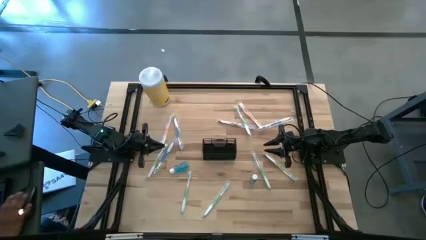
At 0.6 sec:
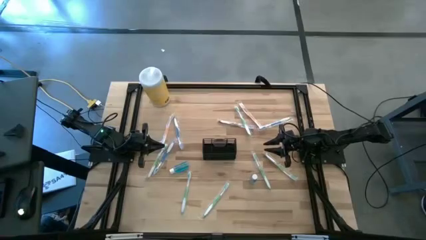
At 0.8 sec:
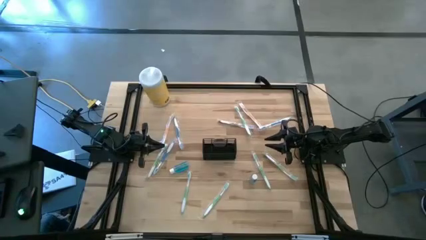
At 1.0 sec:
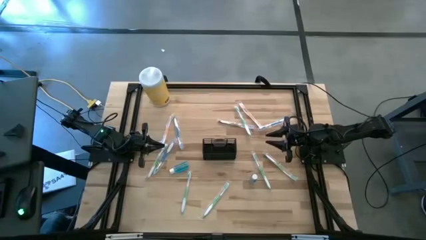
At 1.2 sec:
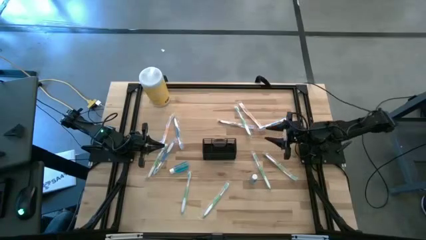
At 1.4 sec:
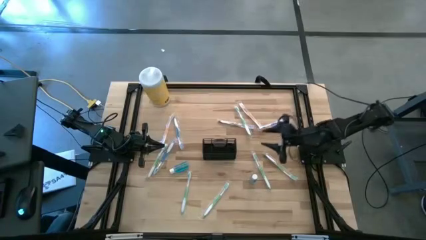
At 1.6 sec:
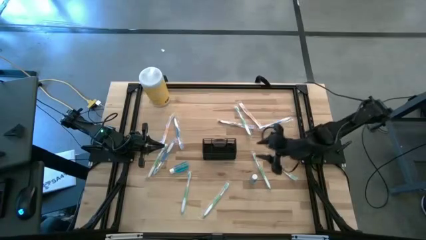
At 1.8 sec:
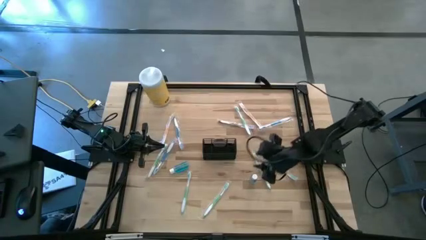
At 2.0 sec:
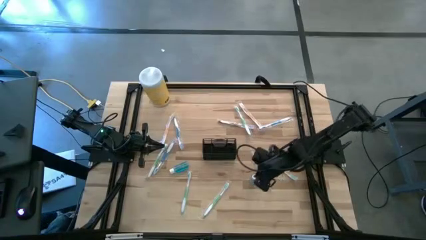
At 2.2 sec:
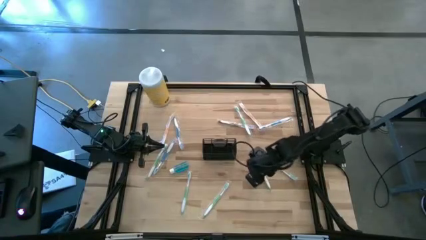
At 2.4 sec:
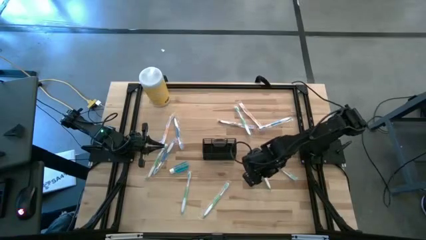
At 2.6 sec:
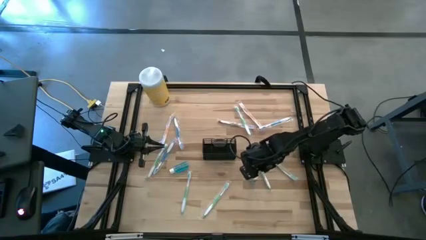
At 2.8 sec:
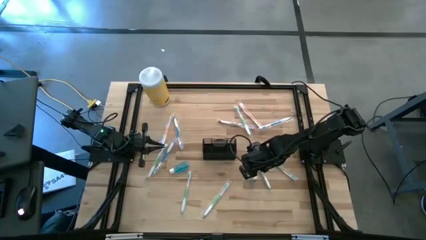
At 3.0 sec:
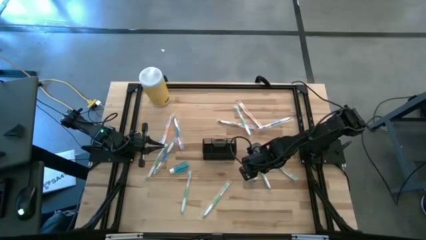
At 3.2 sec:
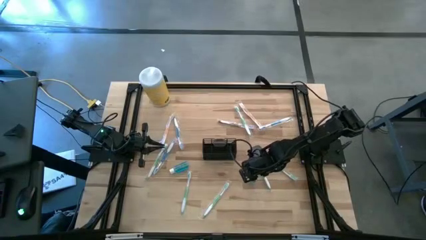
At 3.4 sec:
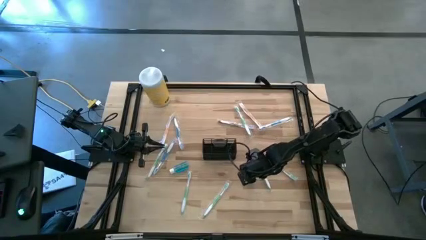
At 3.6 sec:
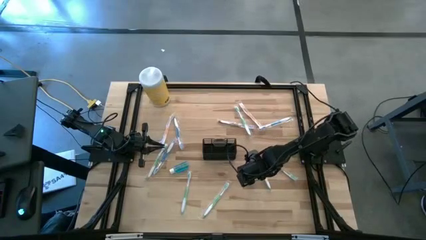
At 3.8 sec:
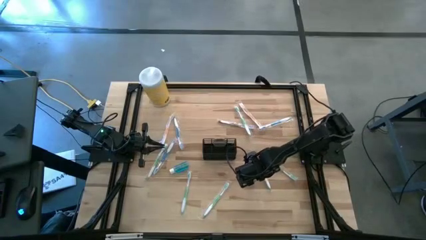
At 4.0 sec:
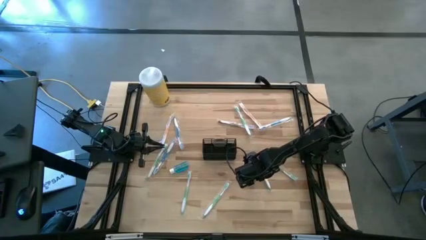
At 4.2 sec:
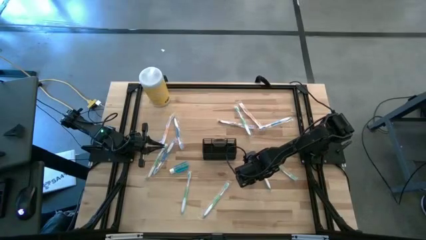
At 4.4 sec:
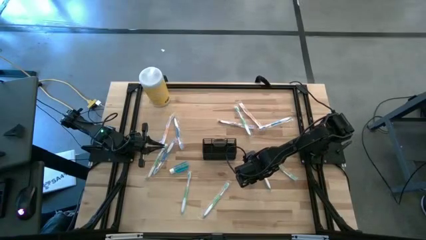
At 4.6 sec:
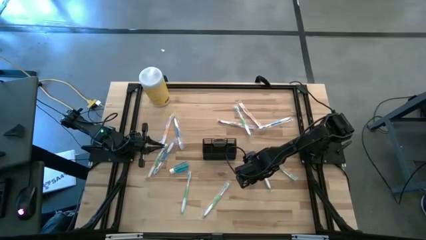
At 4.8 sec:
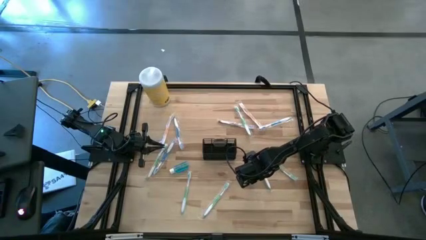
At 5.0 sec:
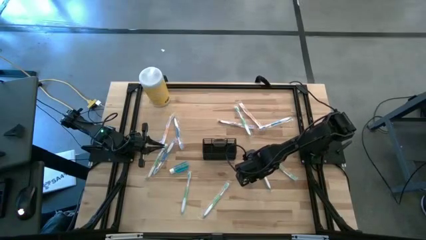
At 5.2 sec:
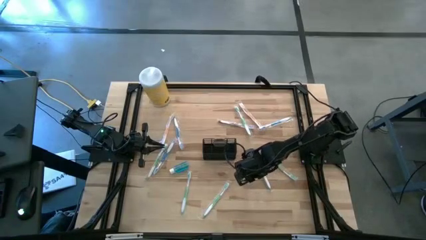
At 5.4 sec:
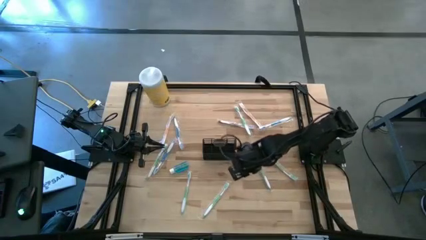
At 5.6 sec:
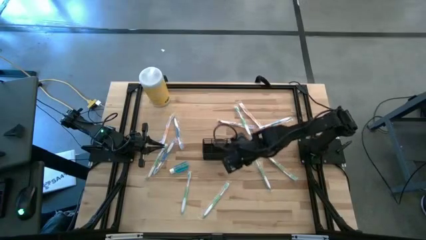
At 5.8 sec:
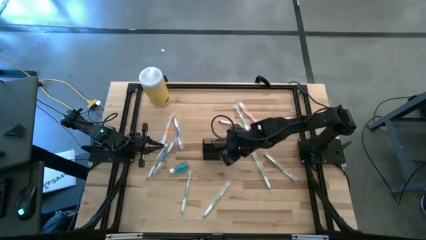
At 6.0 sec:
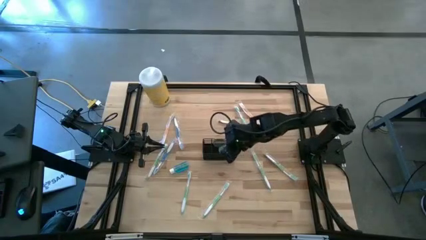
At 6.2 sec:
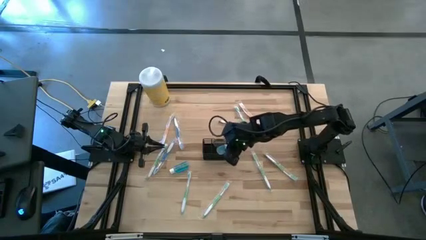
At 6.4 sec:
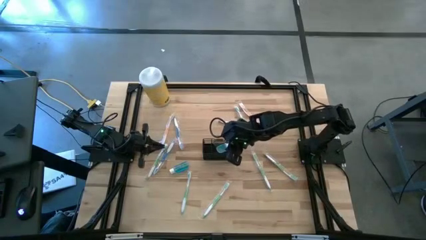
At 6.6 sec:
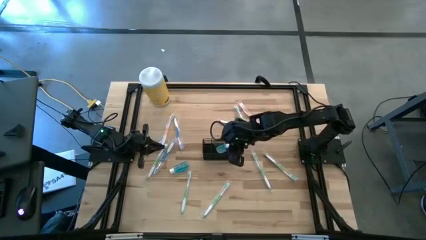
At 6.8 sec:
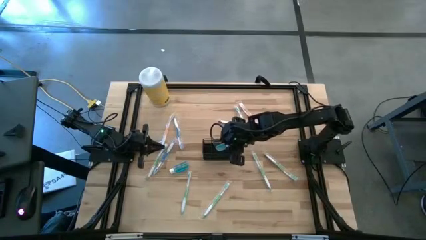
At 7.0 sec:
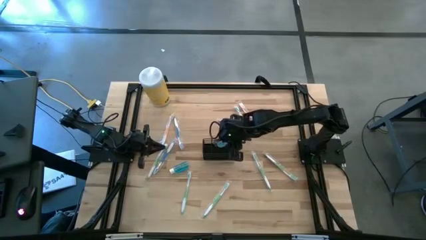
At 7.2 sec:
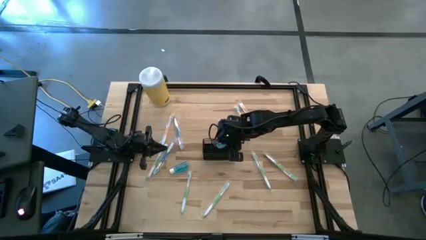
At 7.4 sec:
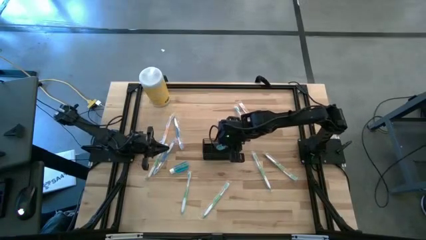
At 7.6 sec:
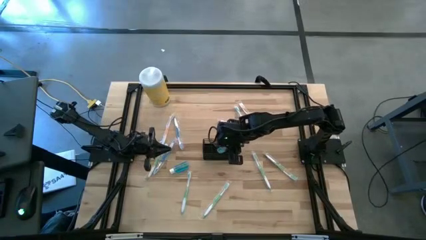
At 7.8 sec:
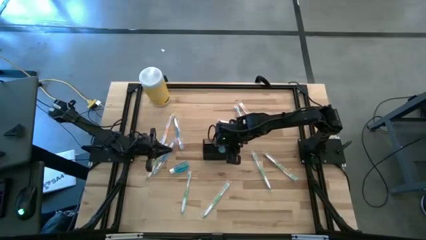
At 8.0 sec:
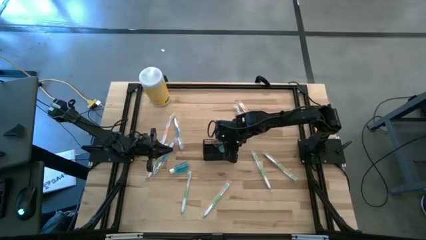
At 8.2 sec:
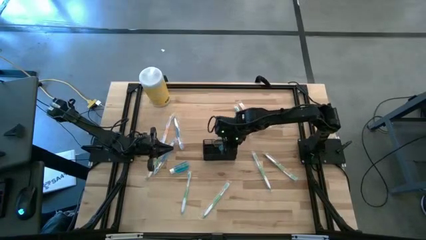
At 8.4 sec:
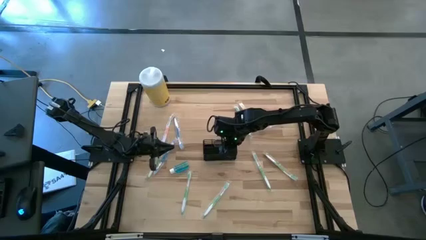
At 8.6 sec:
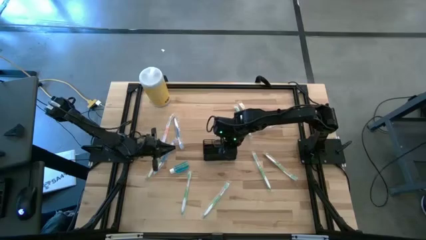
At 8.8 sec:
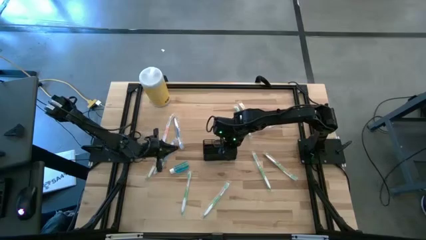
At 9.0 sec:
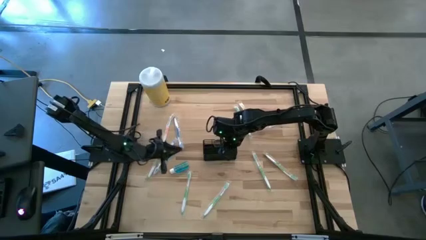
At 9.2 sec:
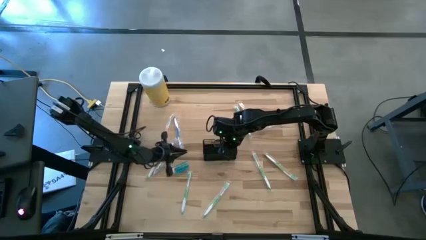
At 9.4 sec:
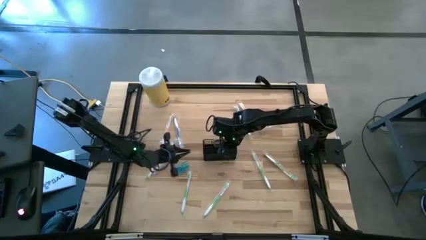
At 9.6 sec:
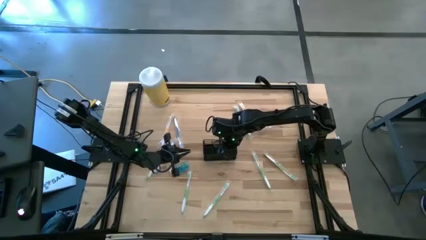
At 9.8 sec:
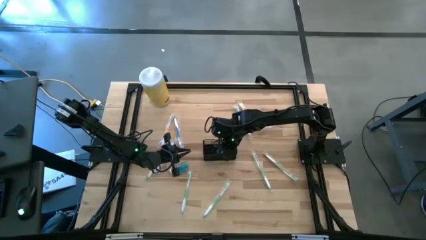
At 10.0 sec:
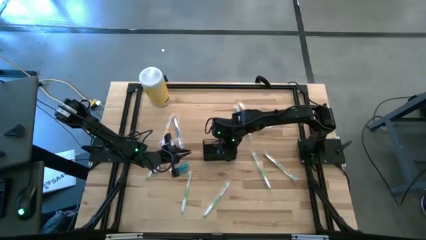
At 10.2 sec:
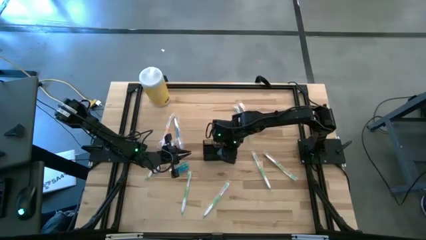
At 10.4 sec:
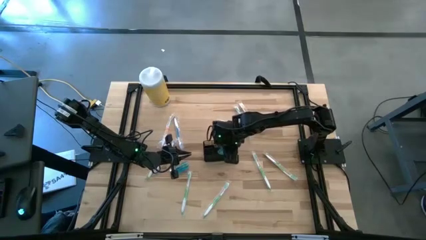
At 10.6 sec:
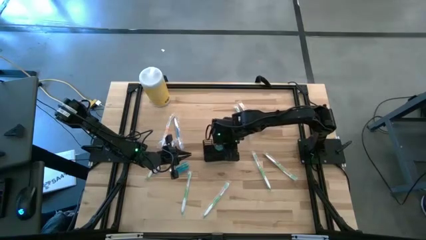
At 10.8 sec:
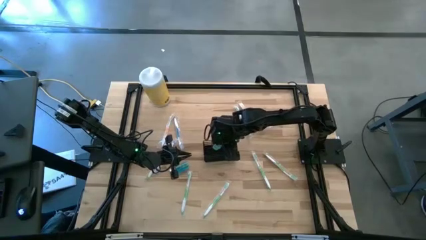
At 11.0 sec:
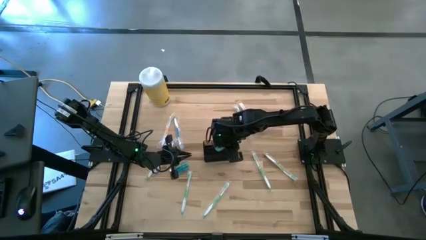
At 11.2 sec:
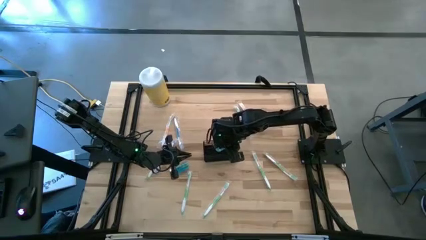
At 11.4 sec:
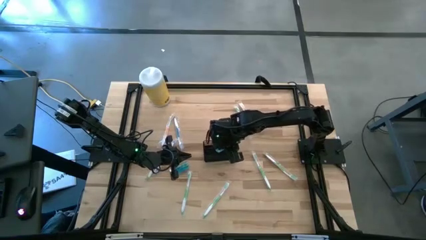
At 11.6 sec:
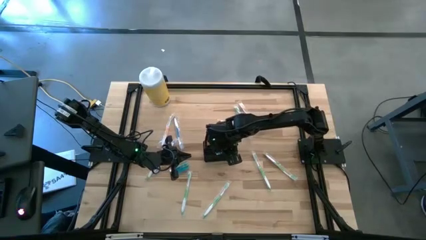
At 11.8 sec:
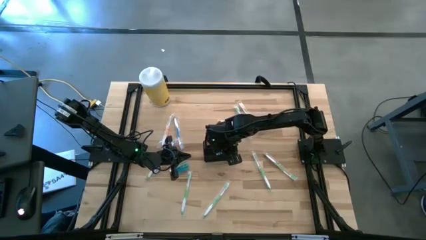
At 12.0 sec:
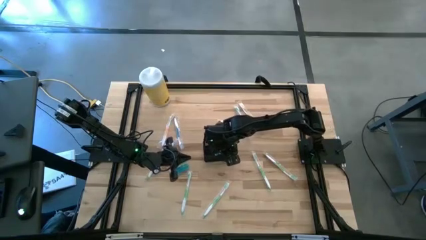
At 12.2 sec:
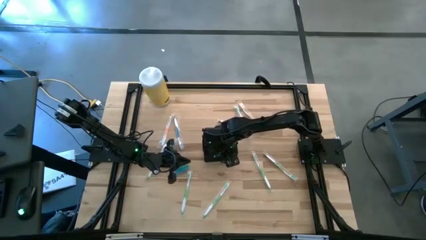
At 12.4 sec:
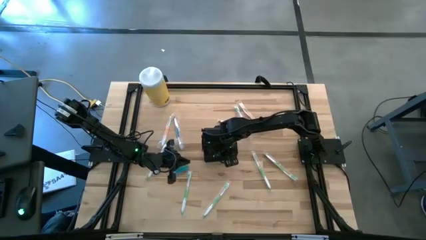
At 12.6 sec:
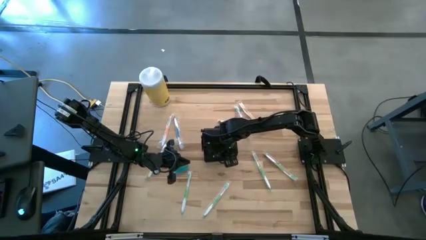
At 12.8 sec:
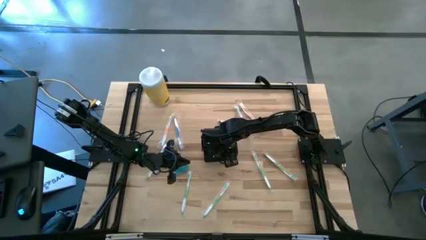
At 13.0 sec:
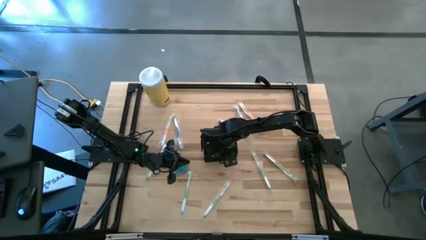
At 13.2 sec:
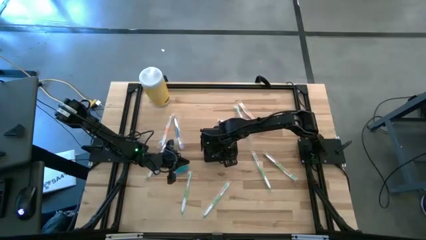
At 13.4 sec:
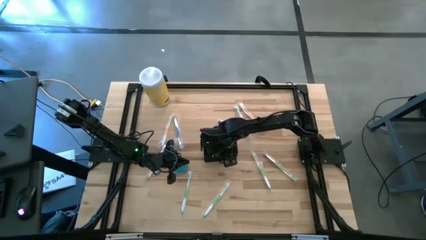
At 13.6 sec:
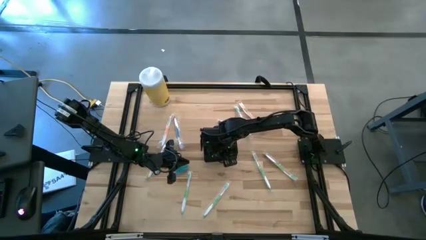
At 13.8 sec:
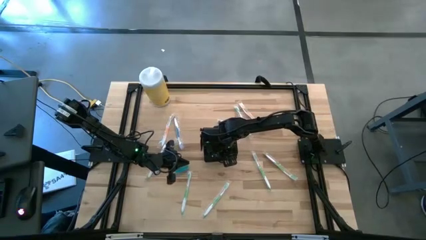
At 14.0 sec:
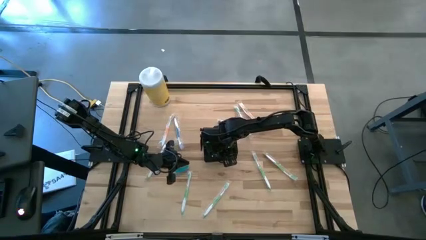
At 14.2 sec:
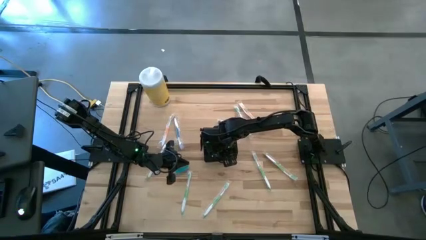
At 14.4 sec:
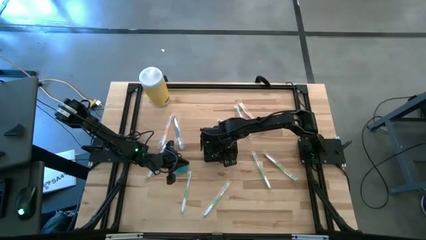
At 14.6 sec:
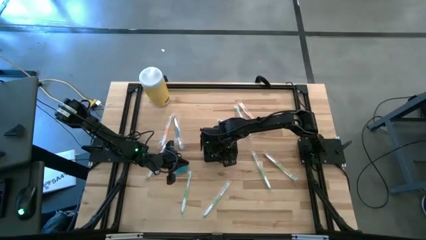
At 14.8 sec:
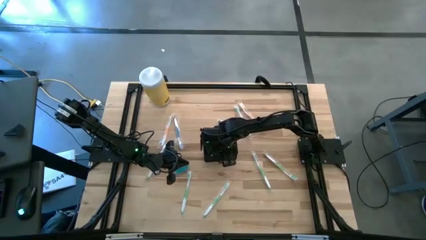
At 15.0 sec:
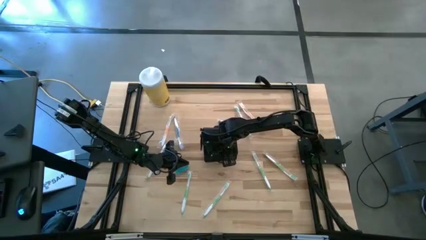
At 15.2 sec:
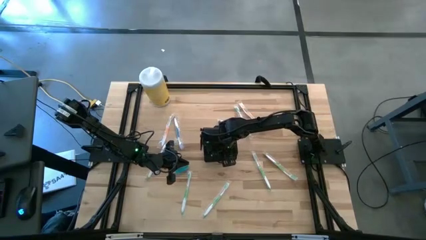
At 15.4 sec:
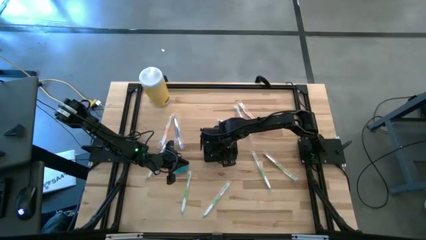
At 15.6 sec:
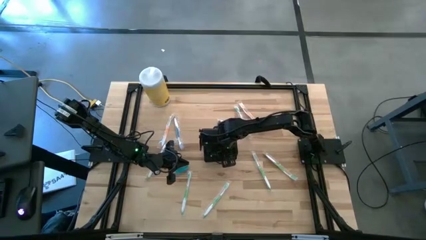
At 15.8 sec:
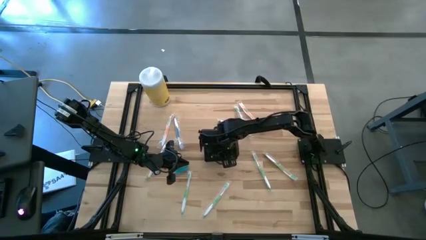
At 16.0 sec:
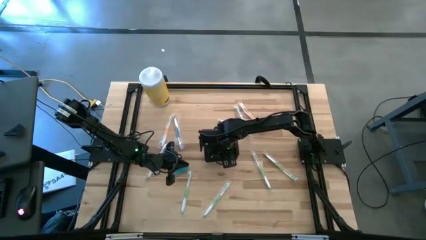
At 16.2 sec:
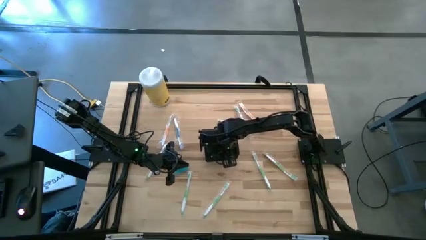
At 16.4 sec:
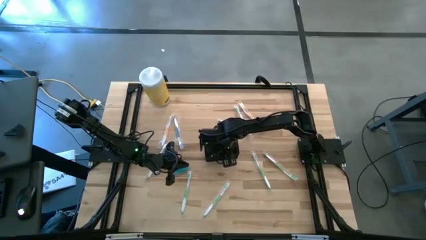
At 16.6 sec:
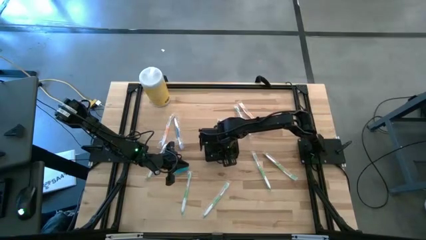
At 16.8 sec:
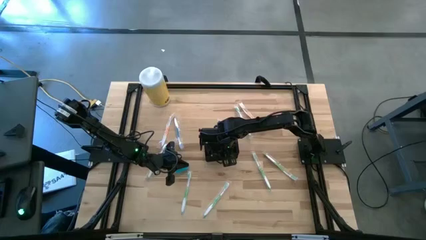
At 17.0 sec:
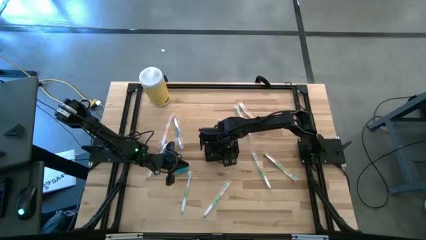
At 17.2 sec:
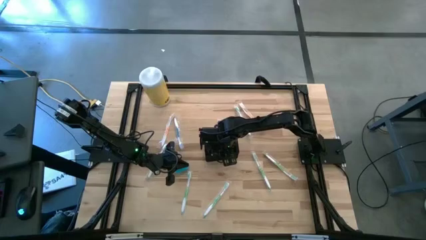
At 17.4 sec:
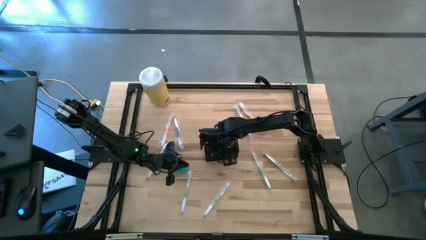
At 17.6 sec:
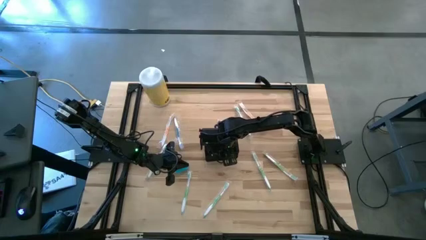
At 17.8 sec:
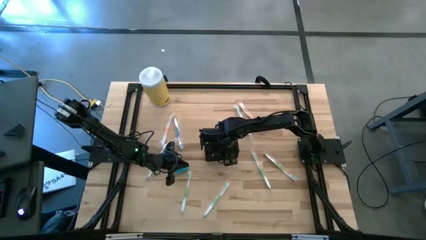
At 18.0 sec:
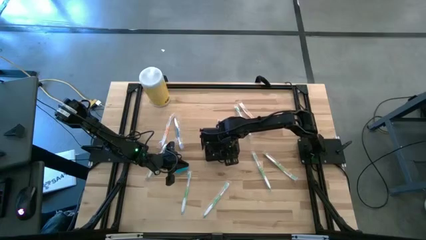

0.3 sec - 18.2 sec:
Task: Pick & Place toothbrushing station
Put the blue mouthwash into the wire organizer
